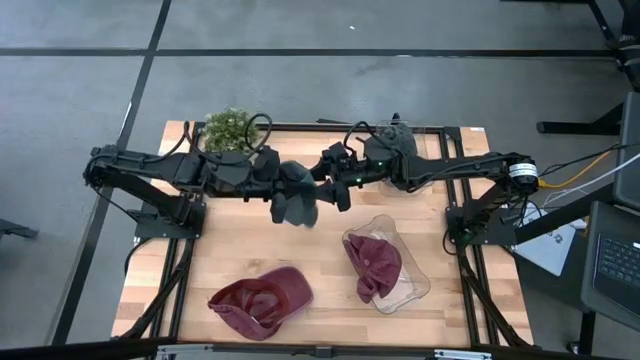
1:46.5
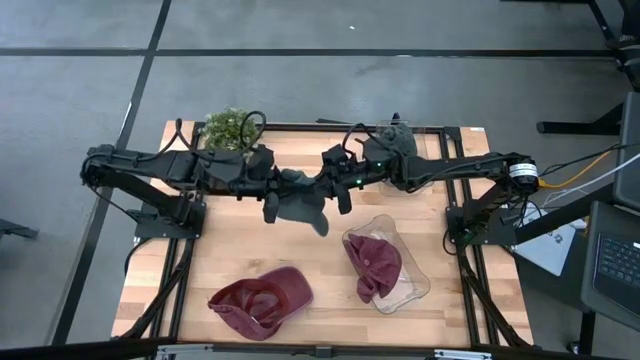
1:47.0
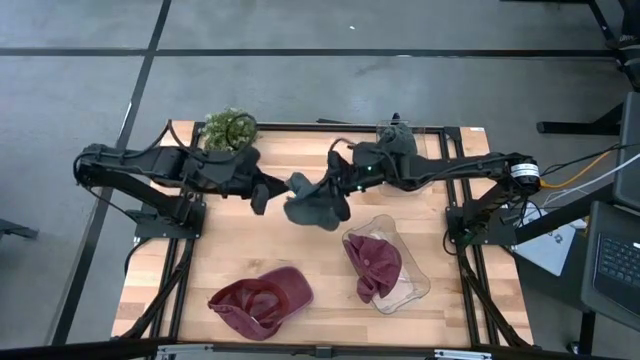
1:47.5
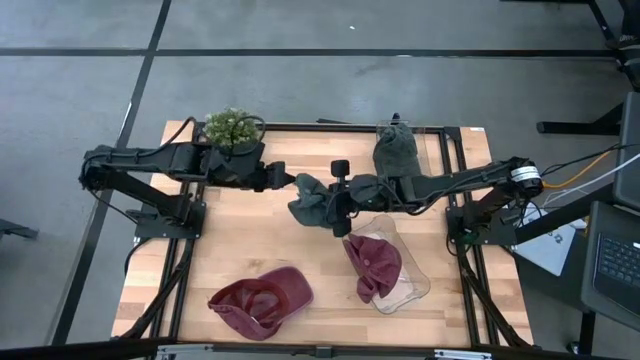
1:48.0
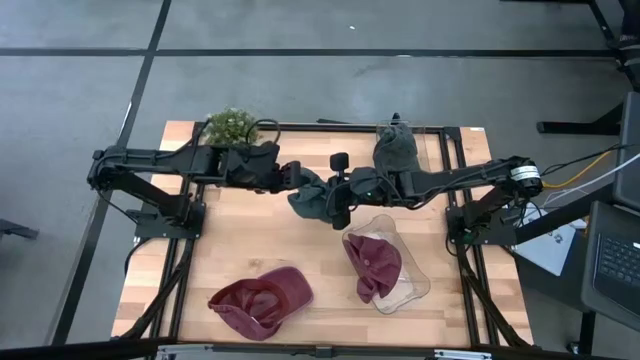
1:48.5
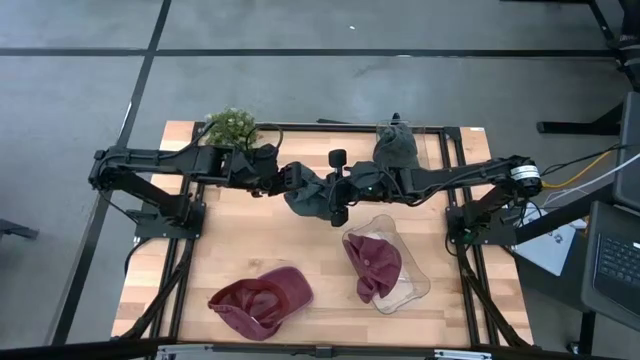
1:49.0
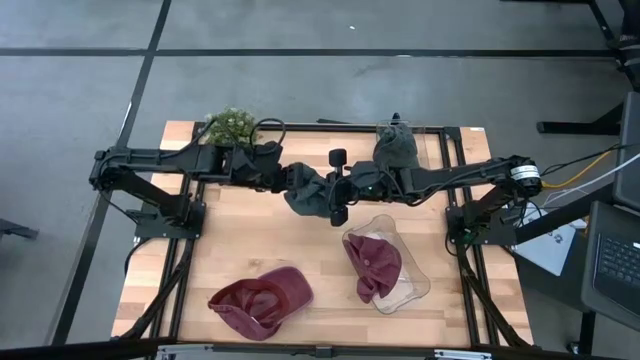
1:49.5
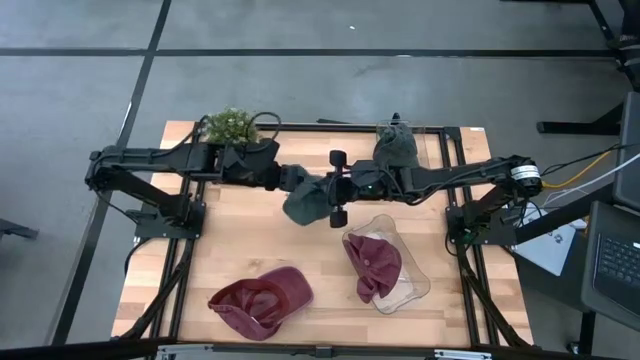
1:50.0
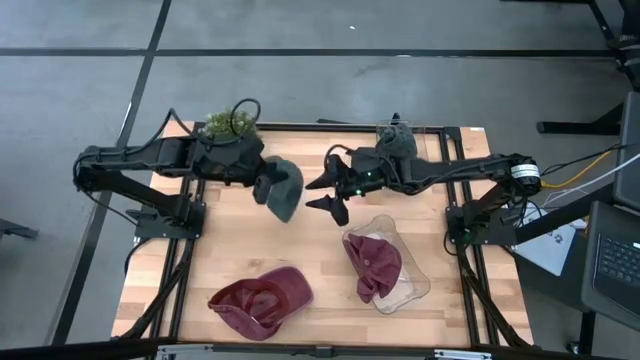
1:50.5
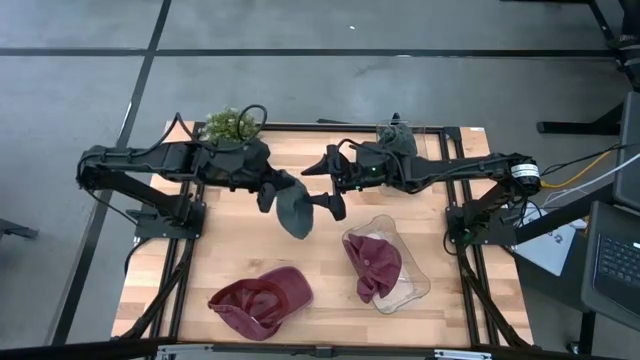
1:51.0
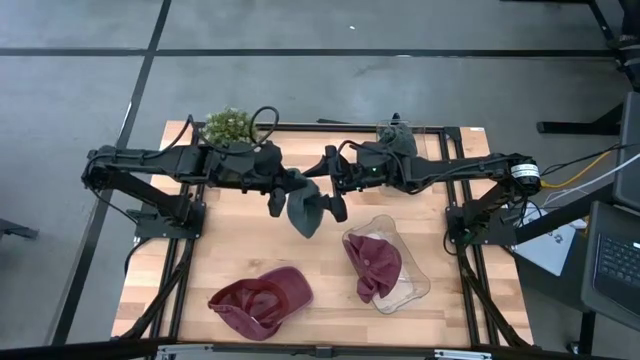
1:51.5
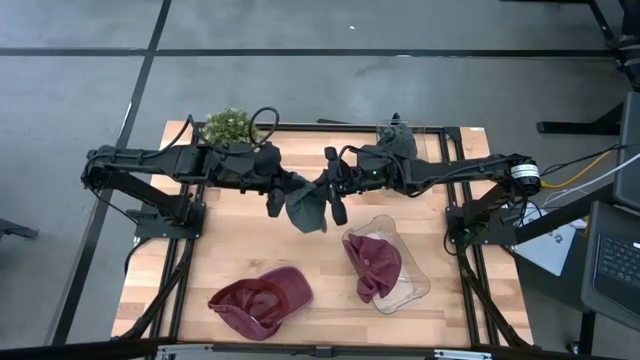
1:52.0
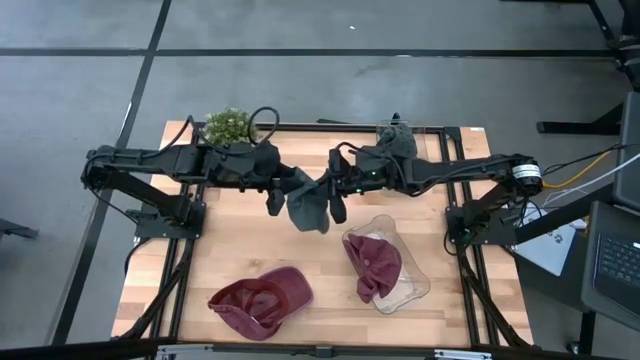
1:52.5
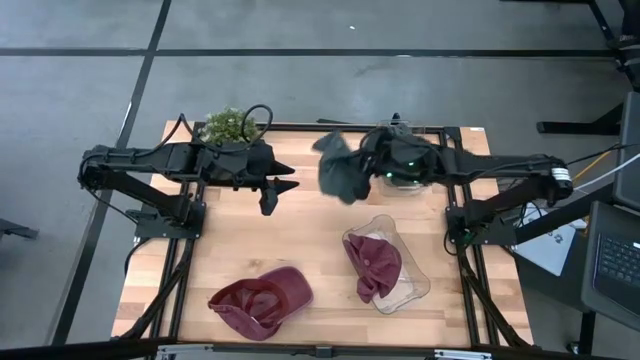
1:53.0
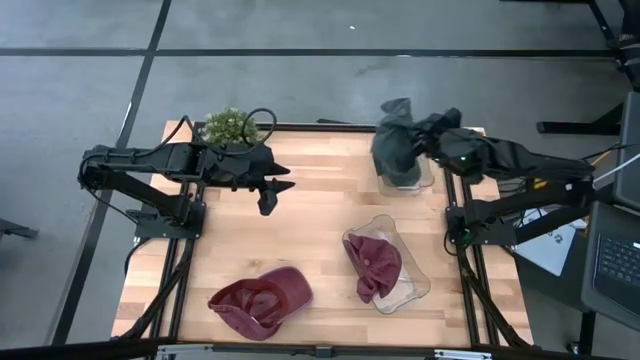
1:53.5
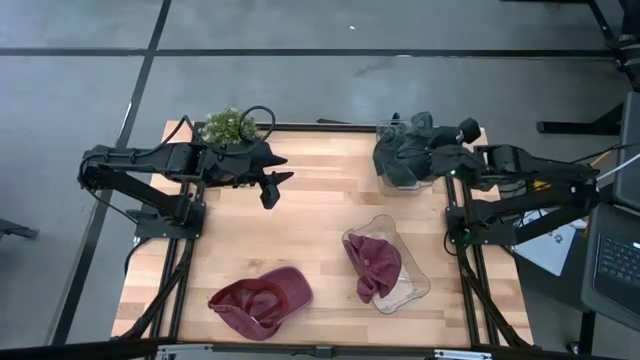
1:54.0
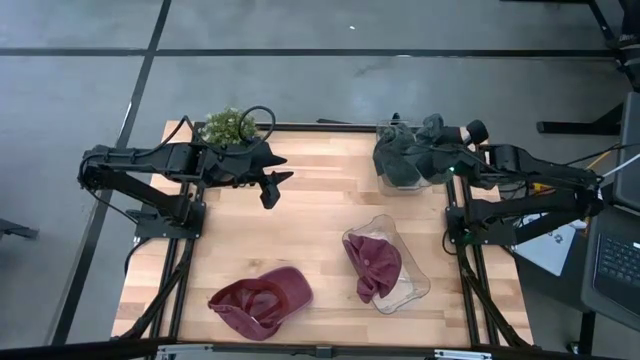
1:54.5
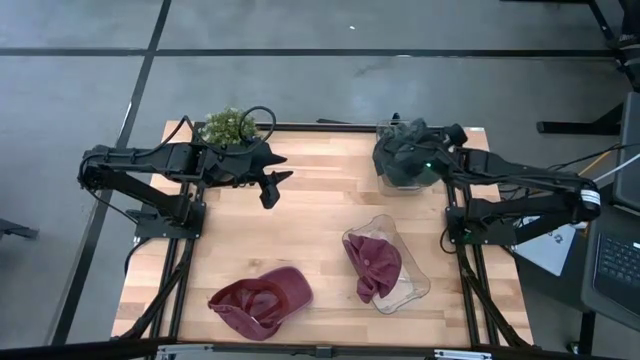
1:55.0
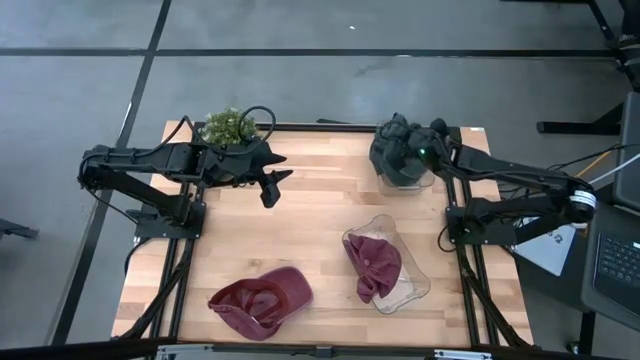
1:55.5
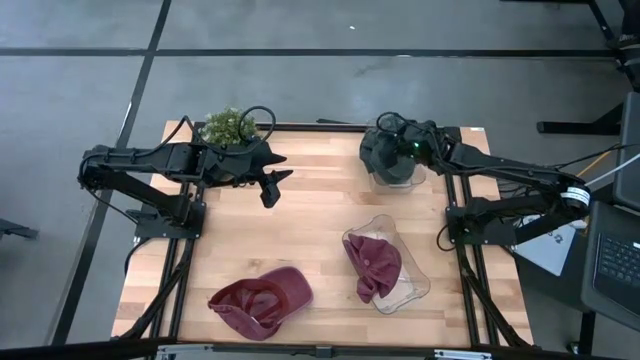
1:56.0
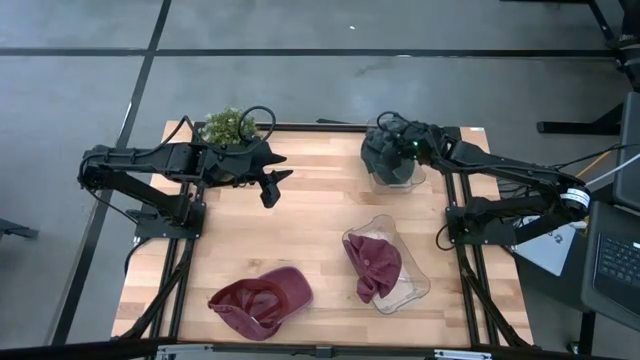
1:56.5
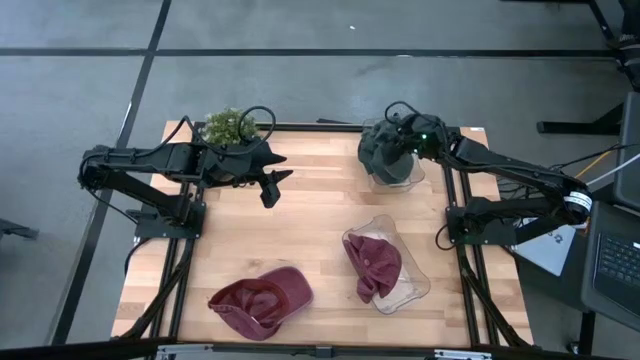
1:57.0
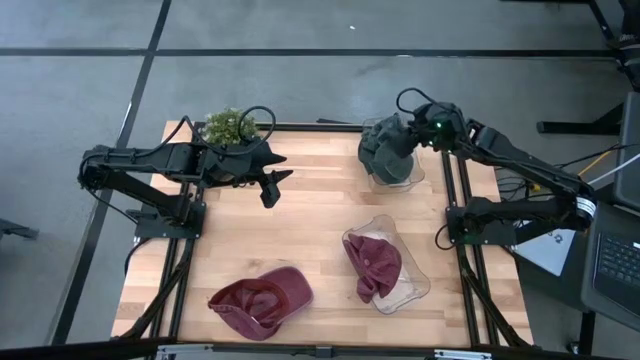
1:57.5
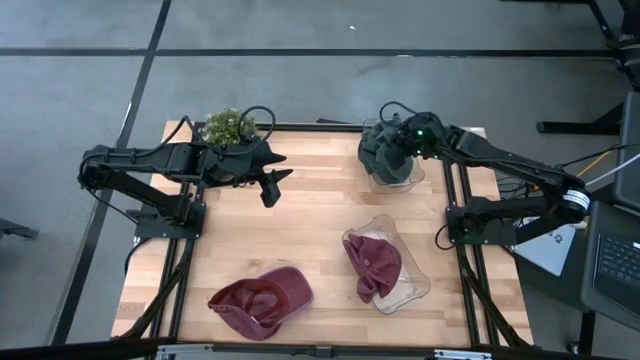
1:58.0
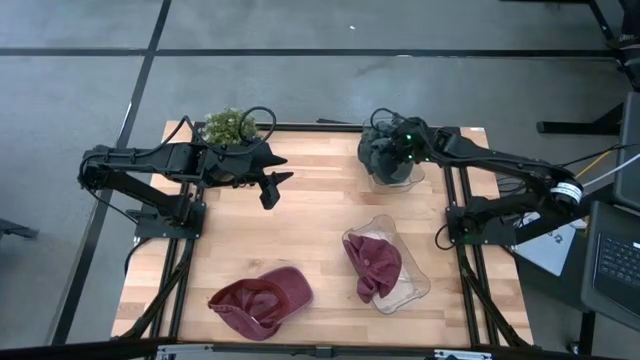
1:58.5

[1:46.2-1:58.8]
Task: Pick & Place hat
Put the black cap into the top transparent bin

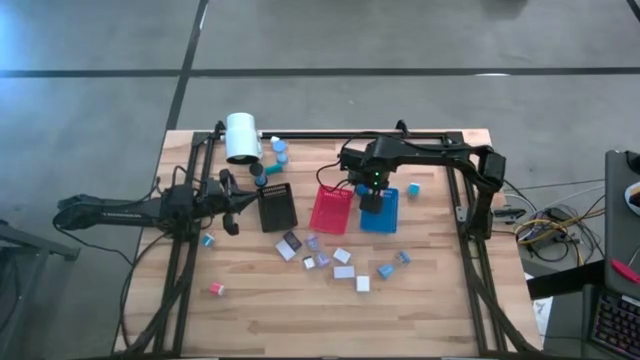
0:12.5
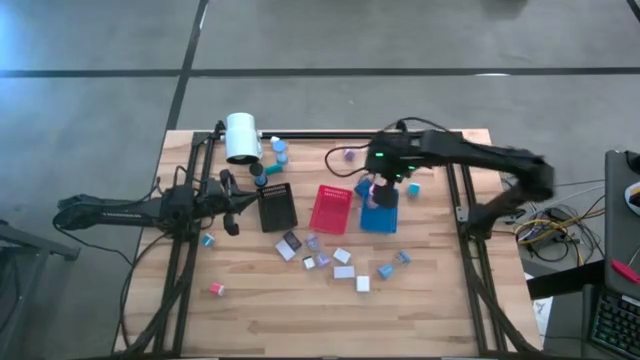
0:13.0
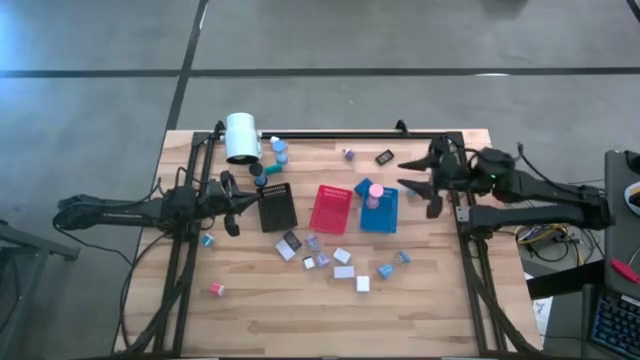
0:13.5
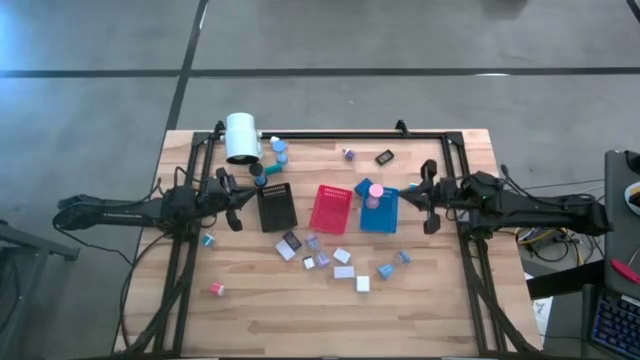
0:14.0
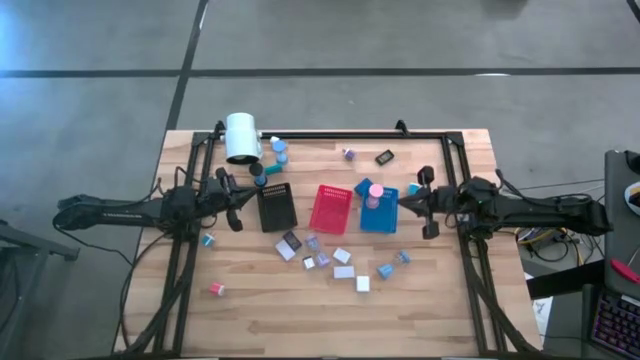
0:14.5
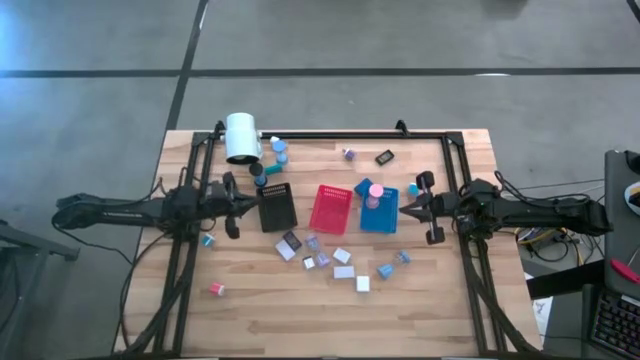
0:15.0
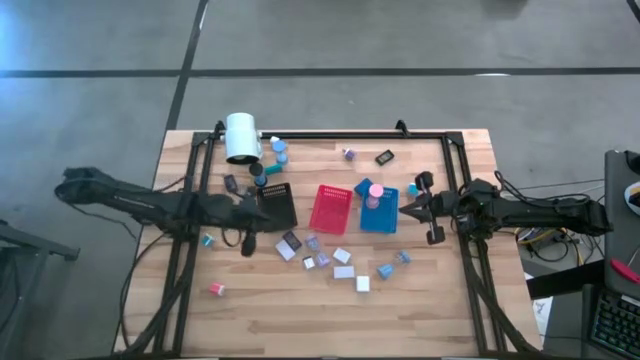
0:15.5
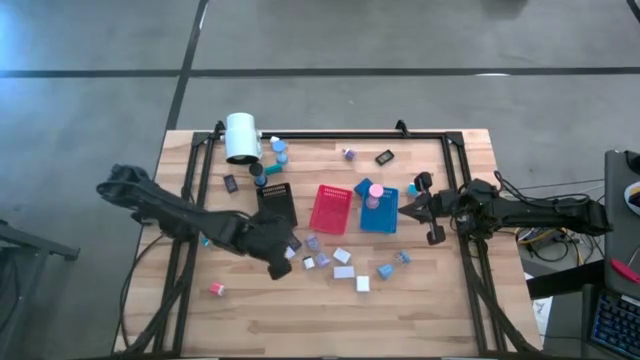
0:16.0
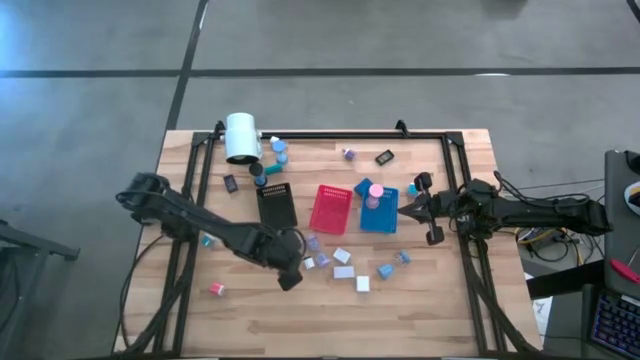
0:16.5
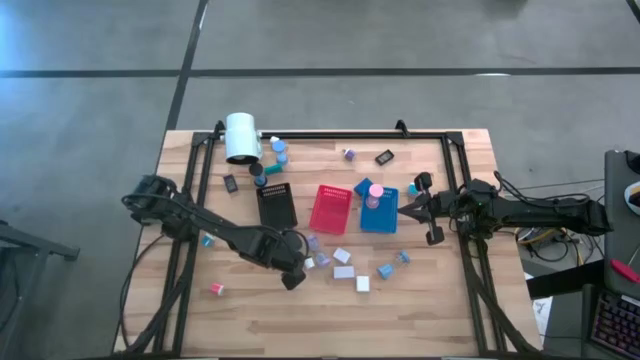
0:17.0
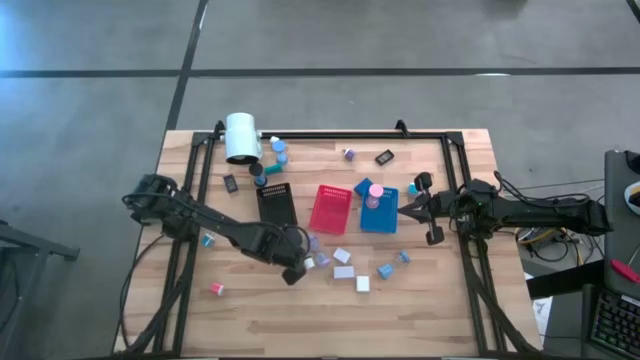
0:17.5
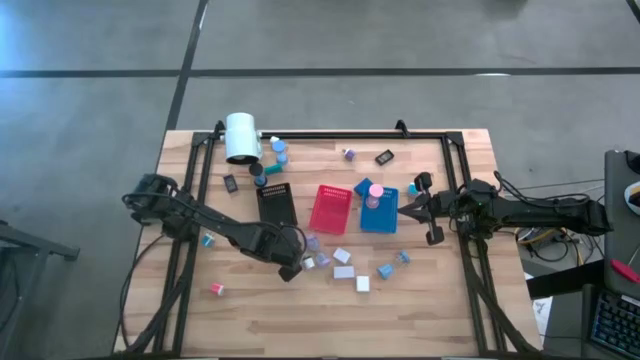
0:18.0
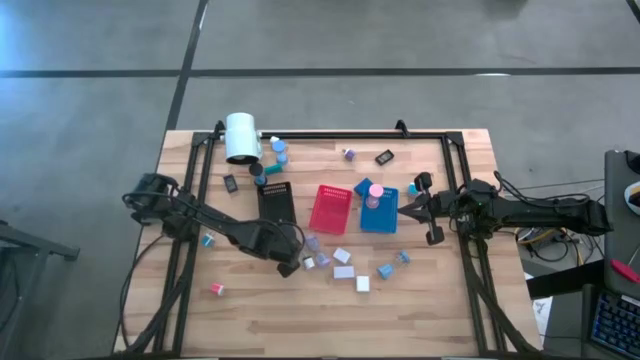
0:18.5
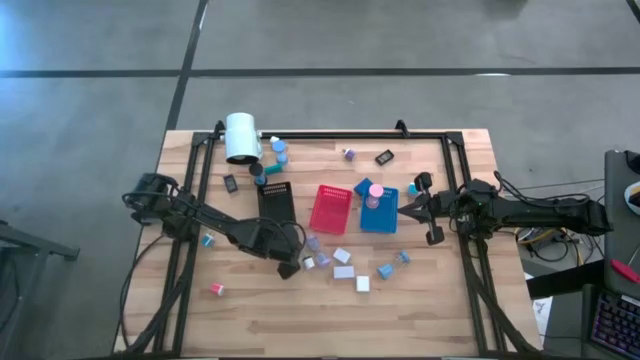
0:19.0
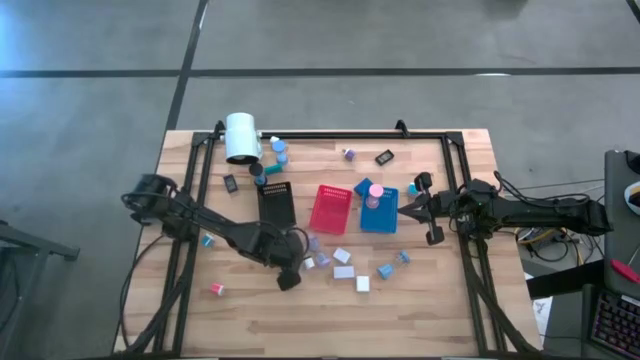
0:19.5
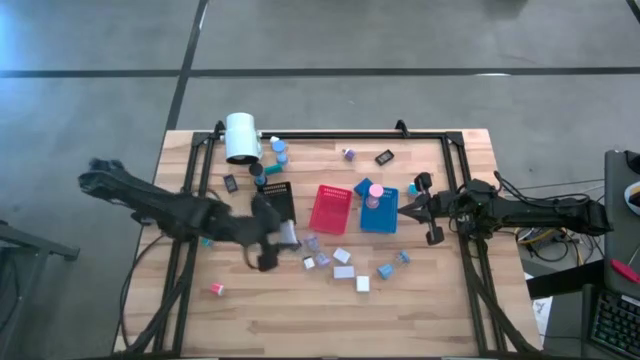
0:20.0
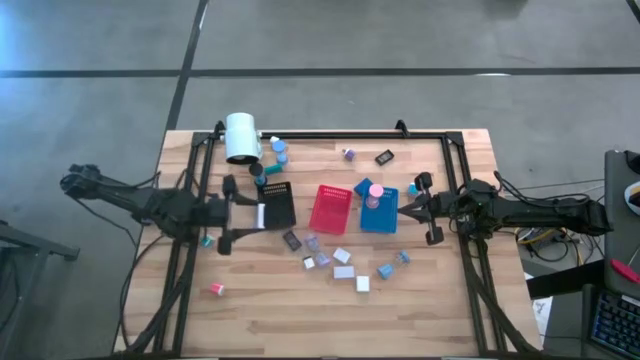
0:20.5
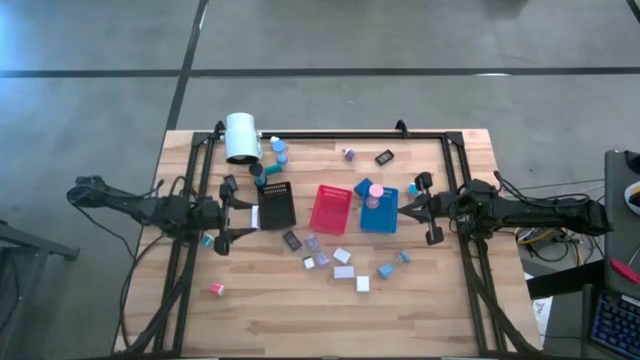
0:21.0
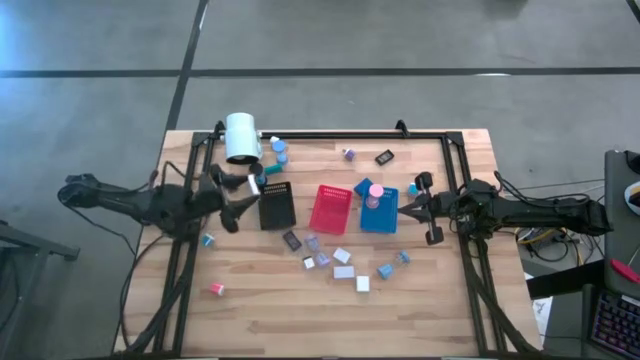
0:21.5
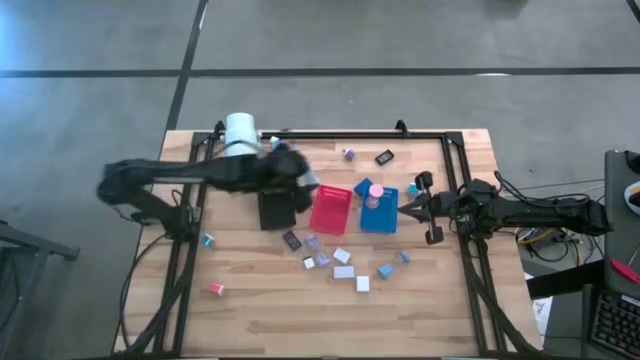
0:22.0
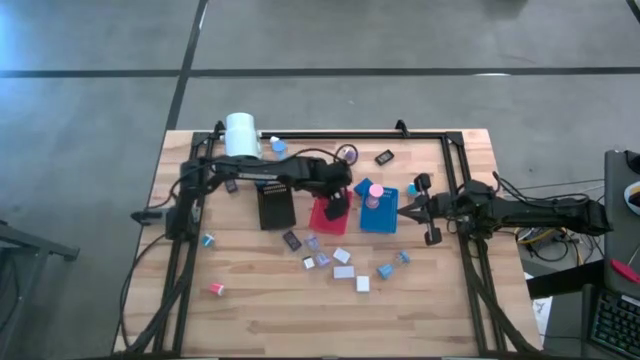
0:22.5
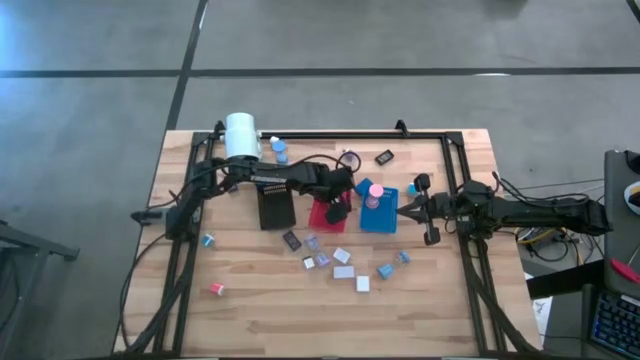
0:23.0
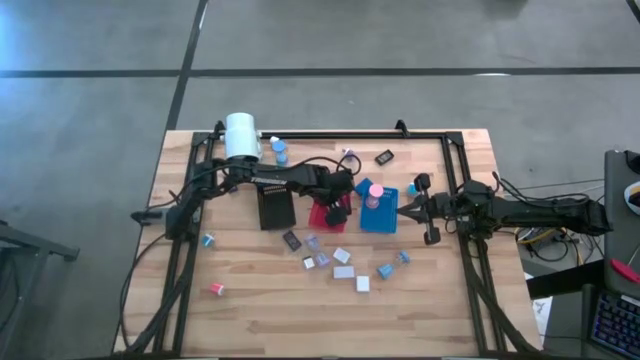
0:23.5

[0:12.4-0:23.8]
Task: Pick & Place Office items
Put the left white digital clock into the red bin
